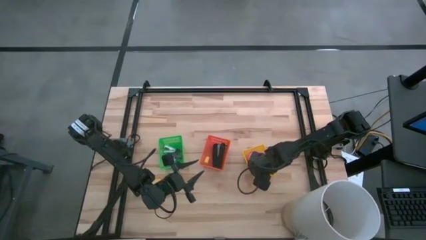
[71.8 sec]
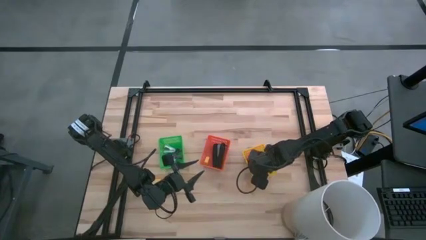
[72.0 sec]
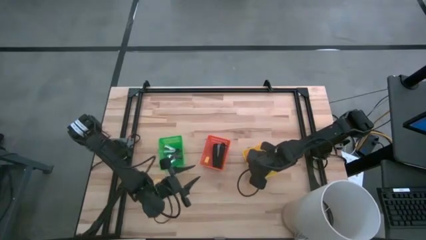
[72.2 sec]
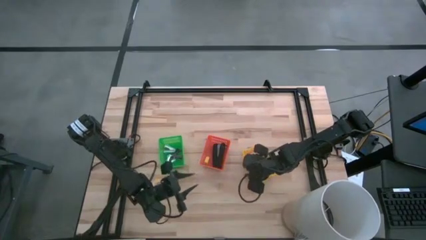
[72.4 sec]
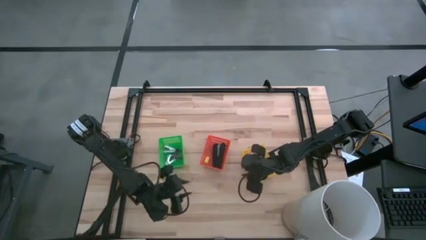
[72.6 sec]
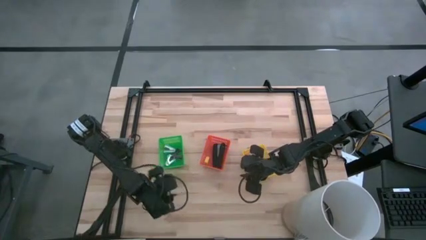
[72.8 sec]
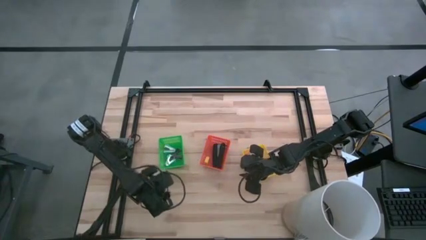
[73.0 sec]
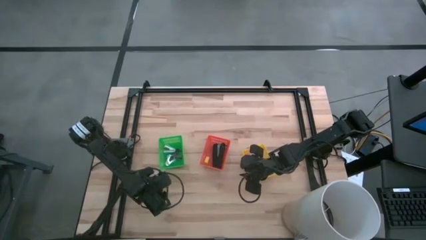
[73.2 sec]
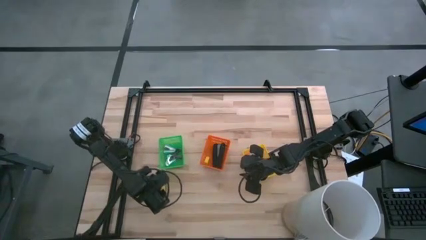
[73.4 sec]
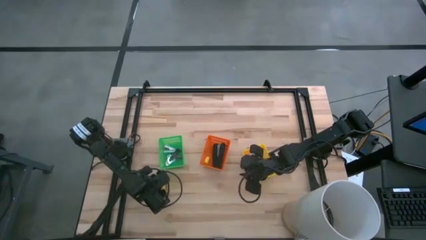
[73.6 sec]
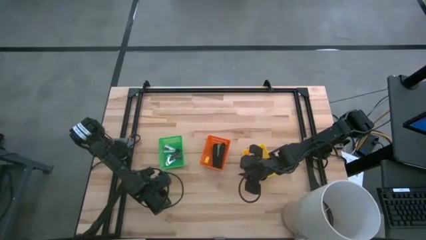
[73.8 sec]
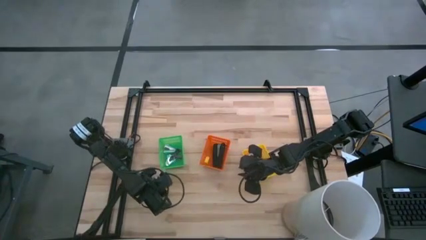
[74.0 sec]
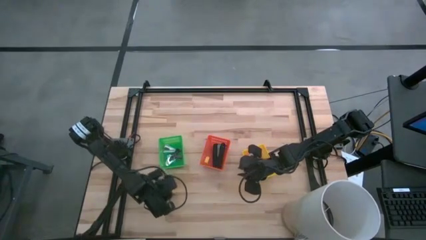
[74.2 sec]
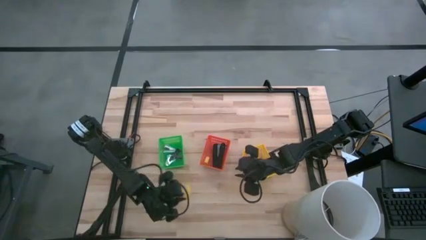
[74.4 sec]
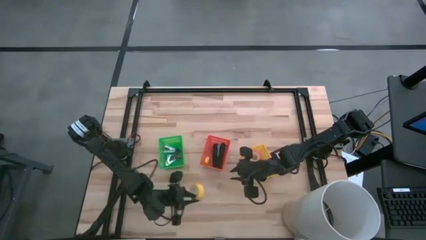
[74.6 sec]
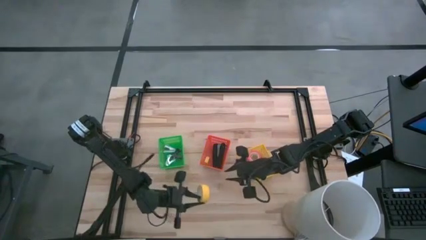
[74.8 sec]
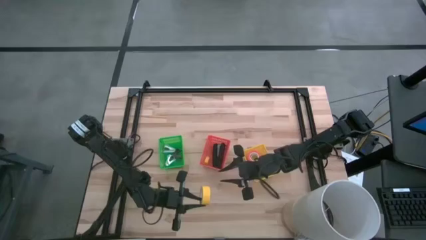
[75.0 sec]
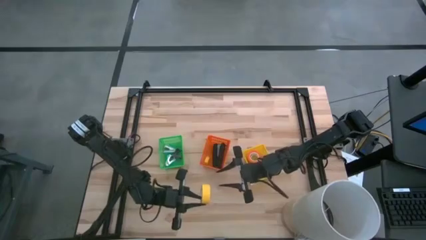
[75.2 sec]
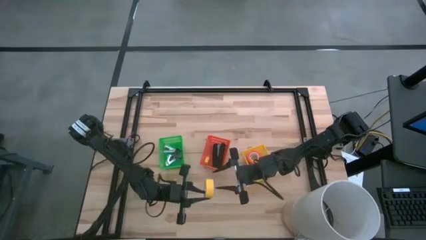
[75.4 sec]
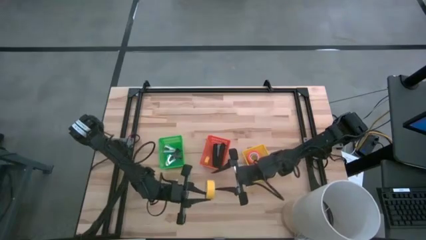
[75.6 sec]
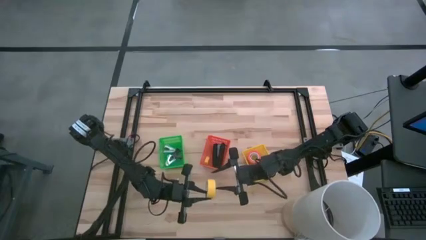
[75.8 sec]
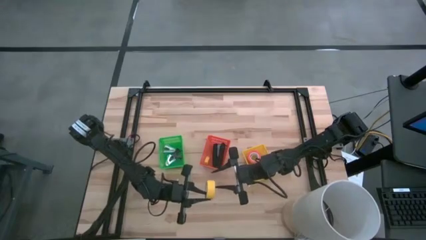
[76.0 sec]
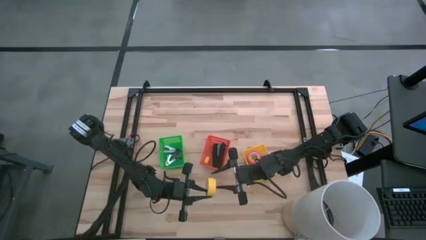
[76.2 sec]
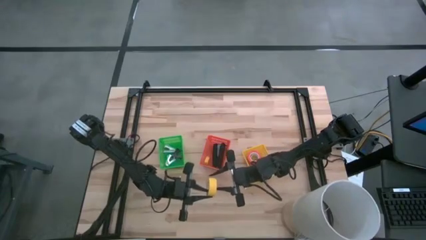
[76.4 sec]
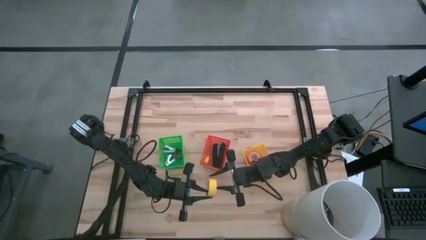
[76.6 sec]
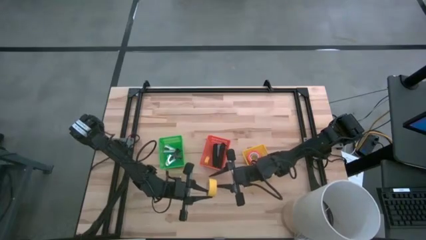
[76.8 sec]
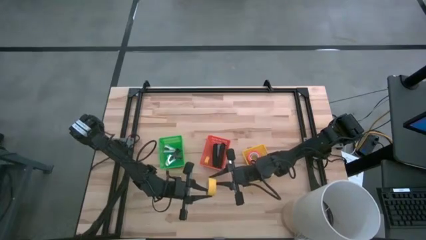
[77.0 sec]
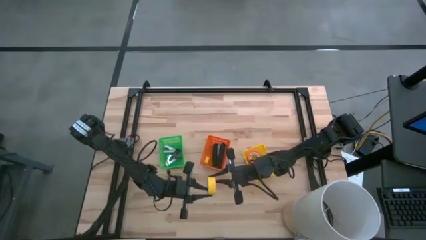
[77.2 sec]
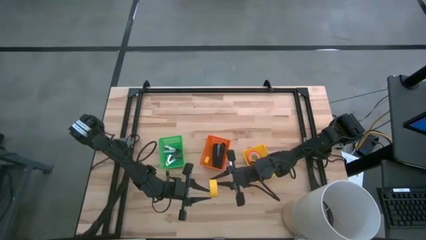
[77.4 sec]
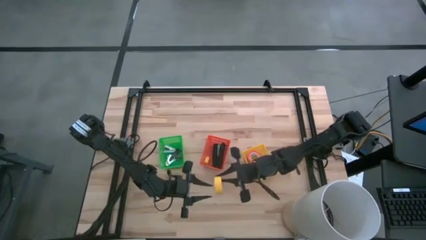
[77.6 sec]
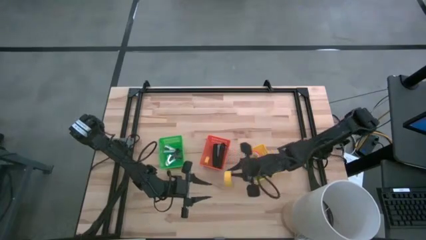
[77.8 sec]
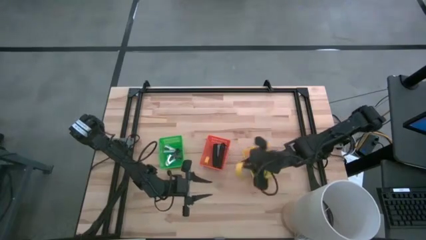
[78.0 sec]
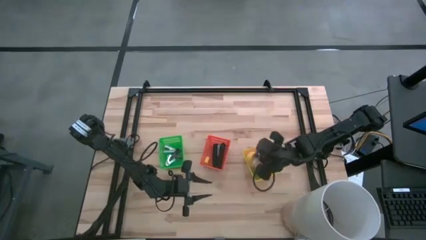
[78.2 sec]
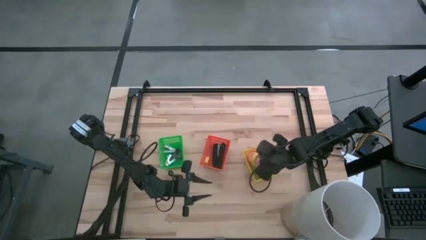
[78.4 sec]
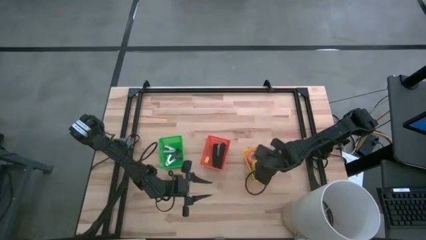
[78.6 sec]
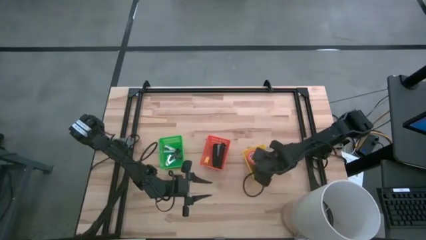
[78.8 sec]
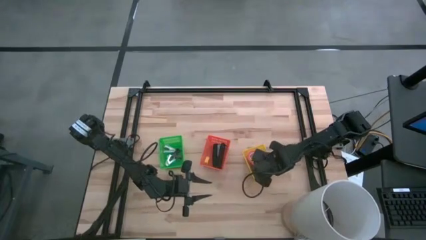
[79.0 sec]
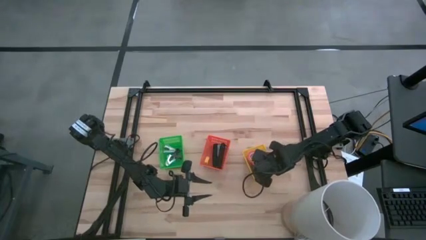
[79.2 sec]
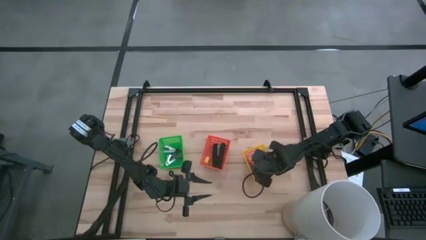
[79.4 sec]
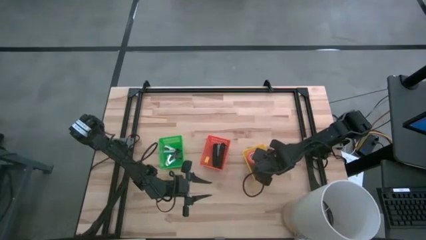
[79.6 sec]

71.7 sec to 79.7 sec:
Task: Pick and place Stapler, Stapler remover, tape
Put the yellow tape into the yellow bin

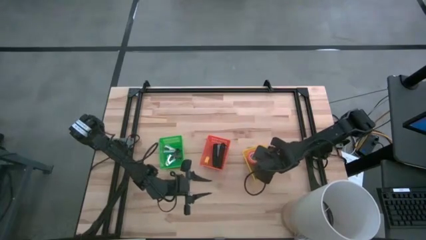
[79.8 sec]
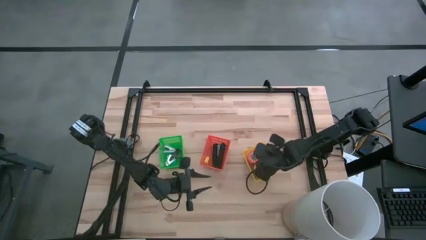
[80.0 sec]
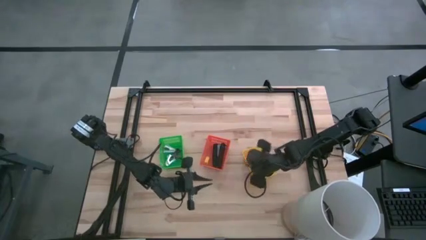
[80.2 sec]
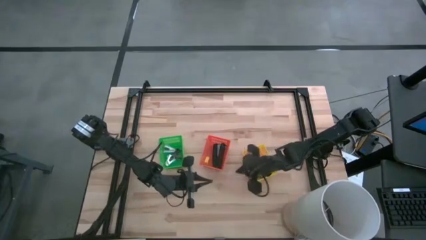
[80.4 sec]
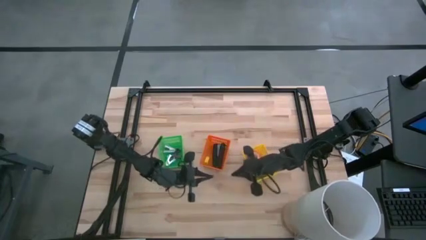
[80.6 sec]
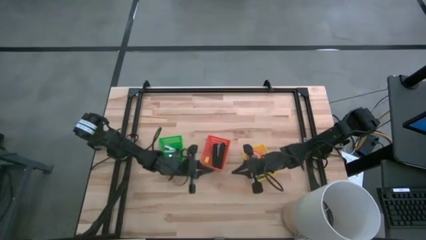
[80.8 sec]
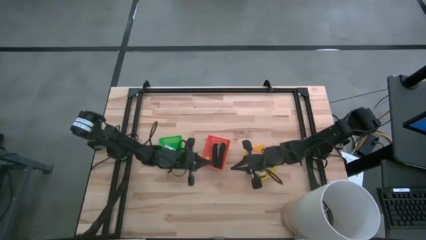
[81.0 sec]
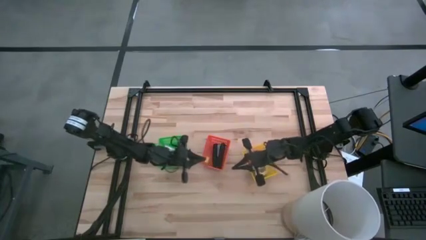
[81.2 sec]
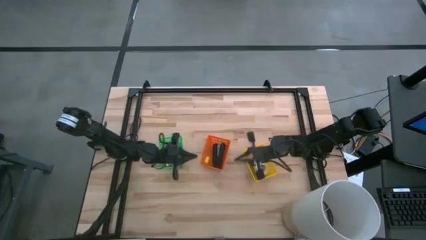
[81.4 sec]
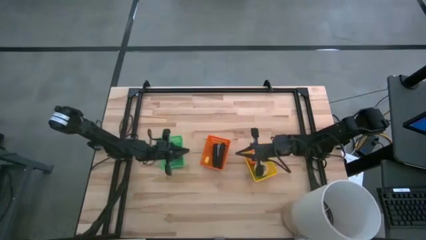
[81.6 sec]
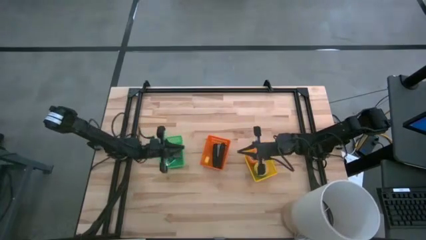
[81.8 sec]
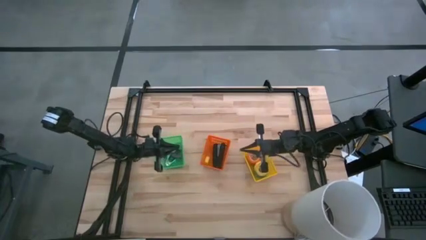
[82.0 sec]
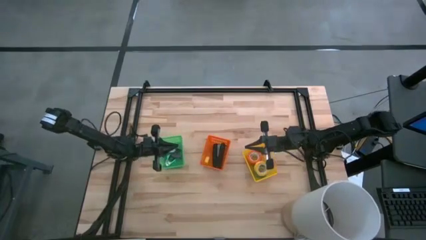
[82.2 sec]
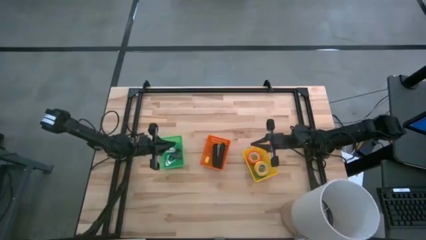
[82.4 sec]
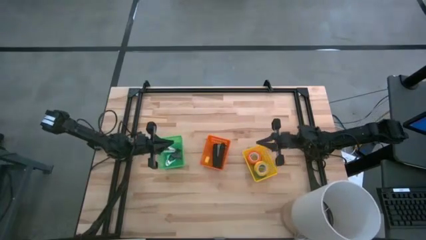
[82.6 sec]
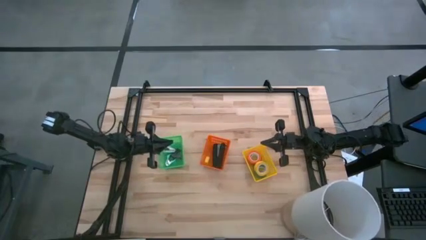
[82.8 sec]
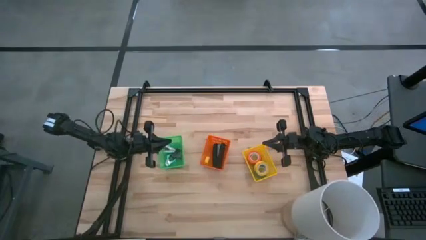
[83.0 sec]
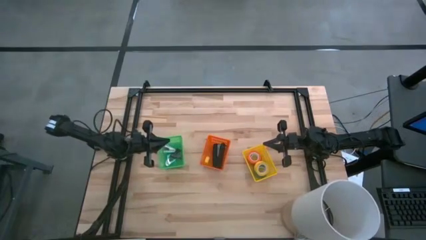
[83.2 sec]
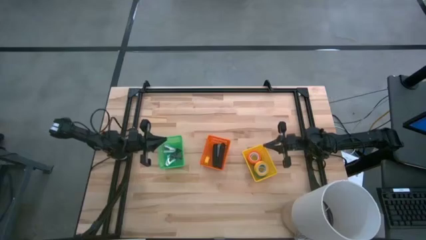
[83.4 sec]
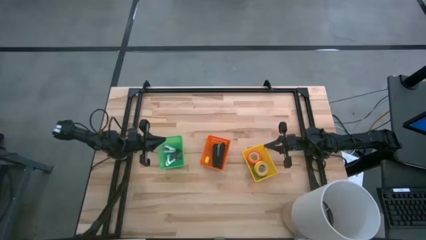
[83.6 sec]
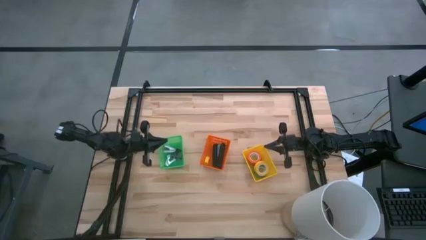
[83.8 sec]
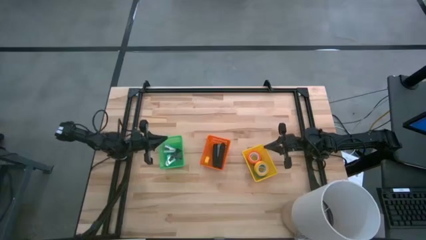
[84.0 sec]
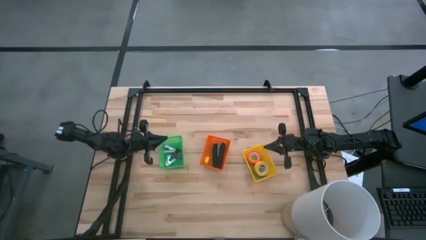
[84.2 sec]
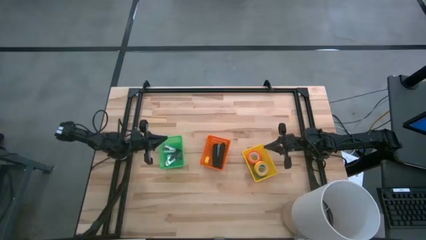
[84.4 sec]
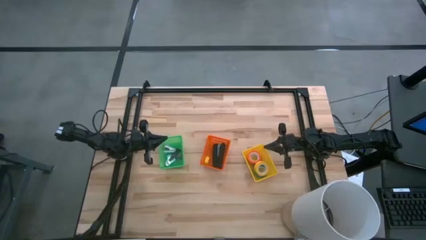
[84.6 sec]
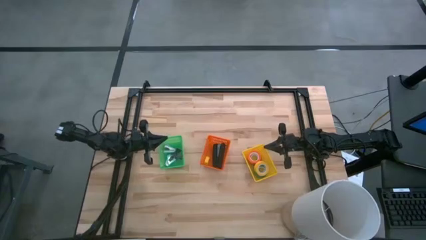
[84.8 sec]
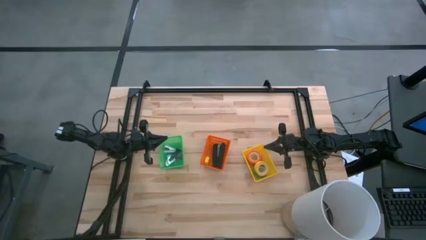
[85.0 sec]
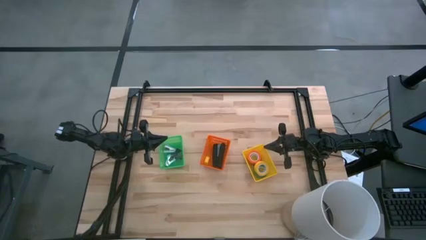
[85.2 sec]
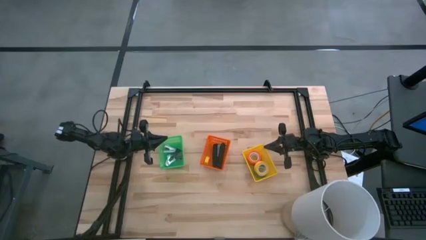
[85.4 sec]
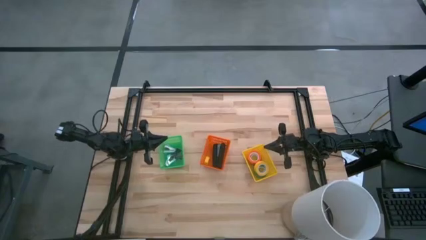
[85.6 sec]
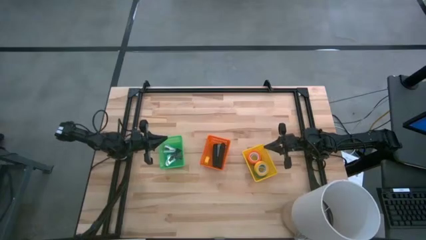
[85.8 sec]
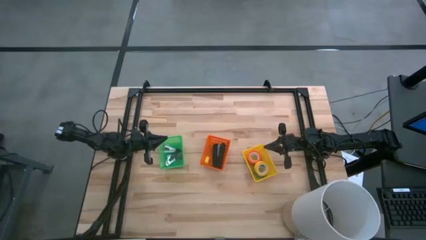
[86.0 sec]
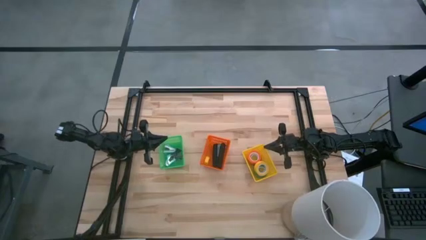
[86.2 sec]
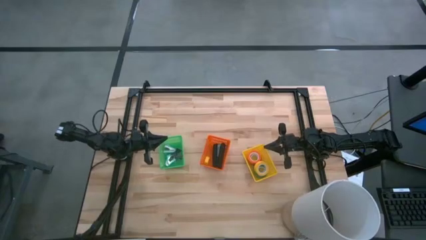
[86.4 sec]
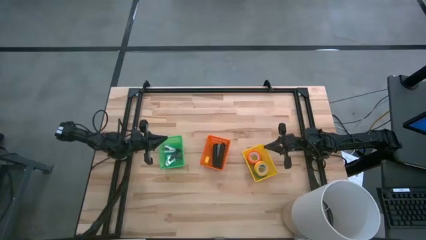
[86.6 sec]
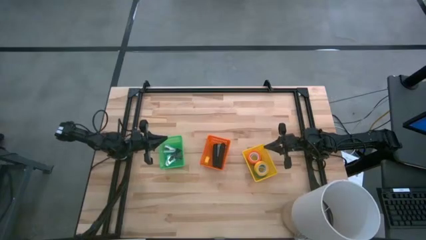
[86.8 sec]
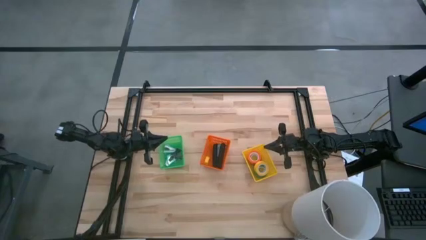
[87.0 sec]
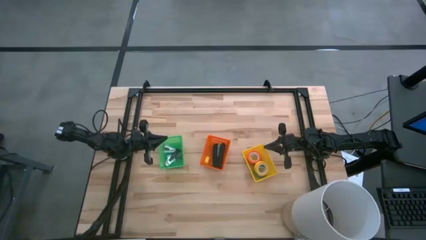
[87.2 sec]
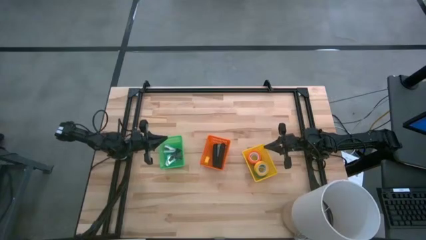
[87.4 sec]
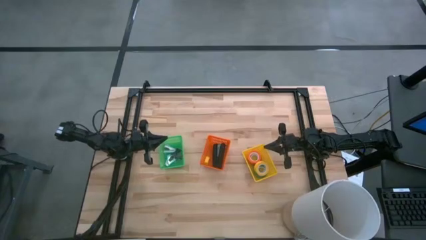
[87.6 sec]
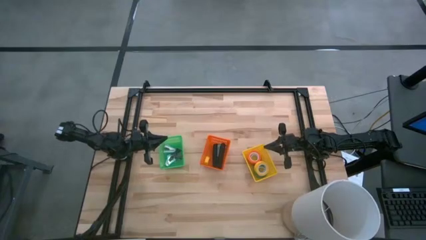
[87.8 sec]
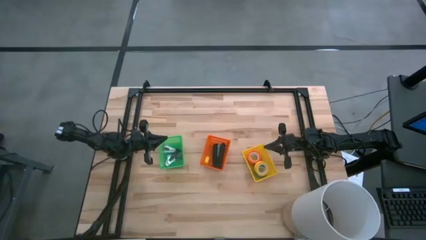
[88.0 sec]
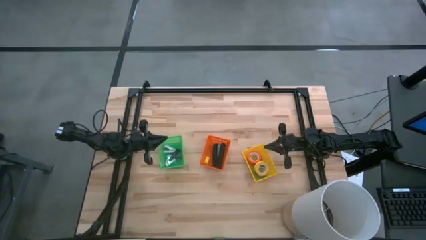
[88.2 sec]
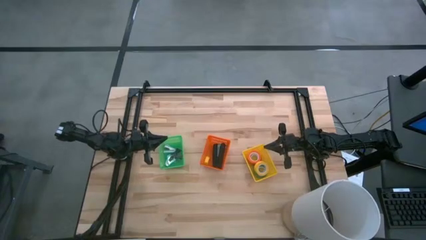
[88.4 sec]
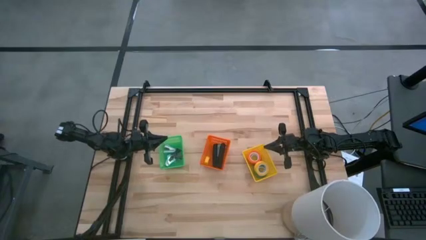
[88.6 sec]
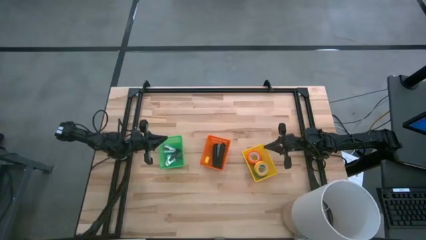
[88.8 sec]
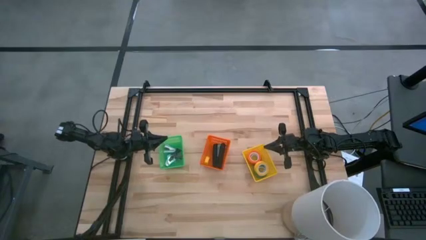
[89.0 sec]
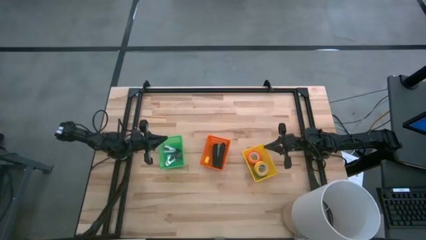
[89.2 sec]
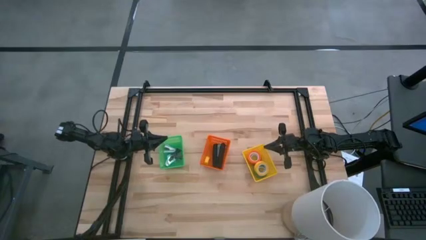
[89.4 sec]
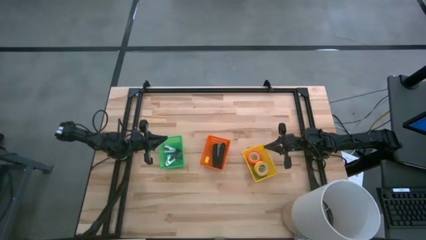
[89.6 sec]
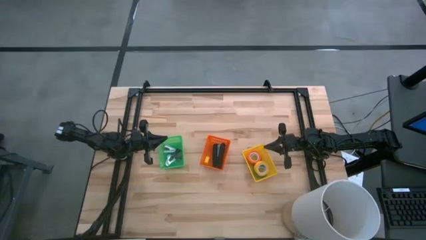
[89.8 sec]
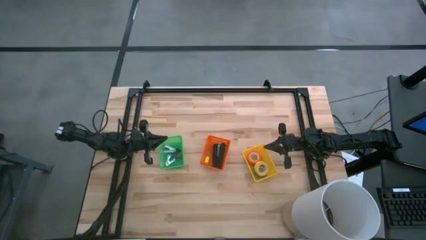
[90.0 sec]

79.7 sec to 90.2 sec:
Return to Home Position
